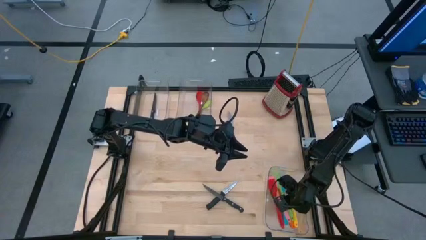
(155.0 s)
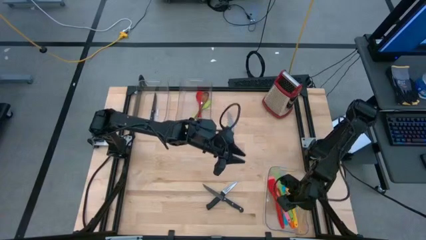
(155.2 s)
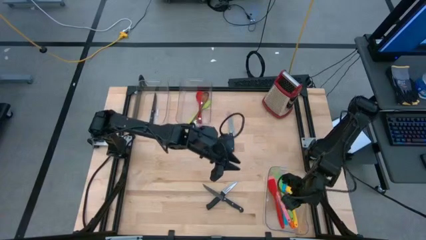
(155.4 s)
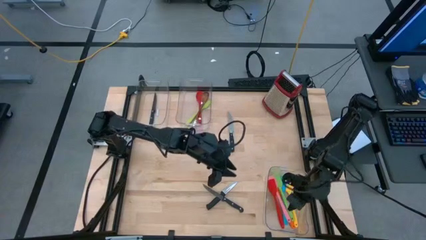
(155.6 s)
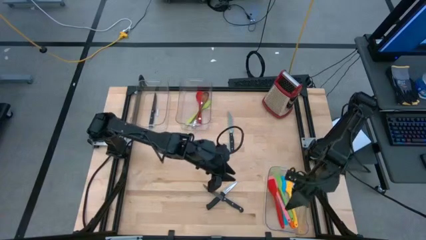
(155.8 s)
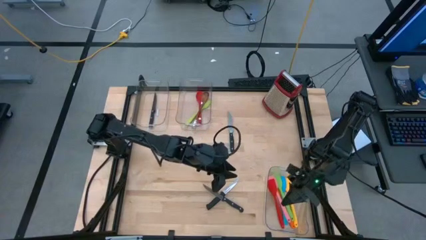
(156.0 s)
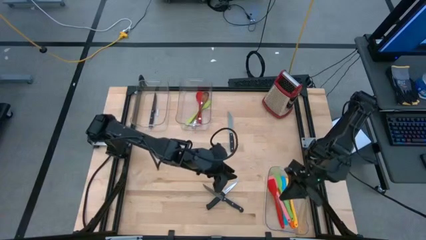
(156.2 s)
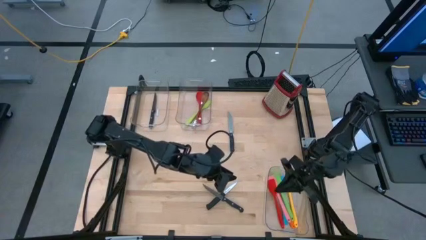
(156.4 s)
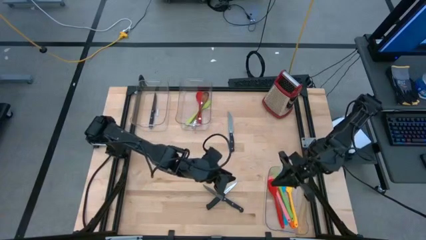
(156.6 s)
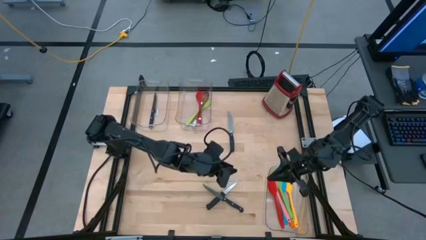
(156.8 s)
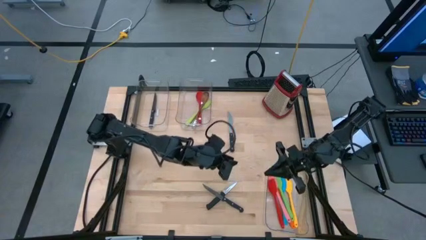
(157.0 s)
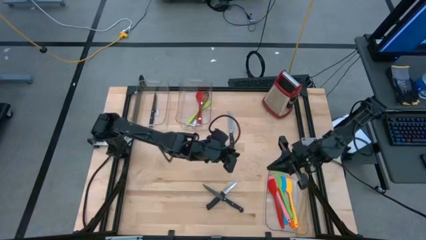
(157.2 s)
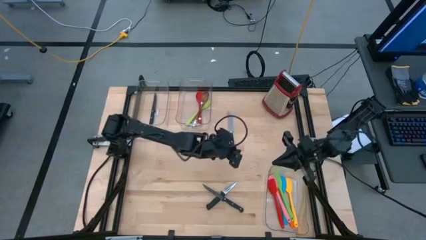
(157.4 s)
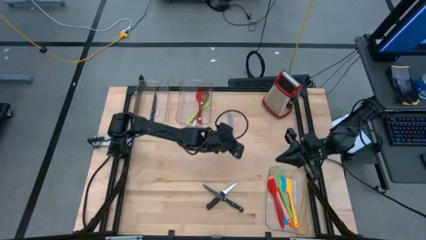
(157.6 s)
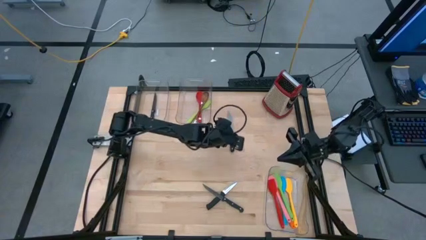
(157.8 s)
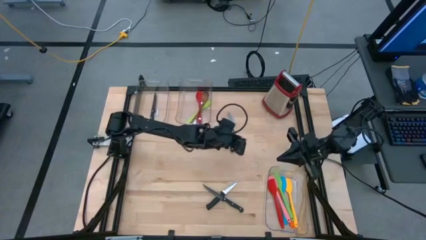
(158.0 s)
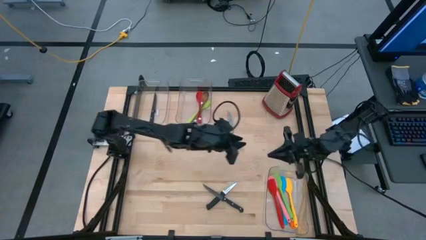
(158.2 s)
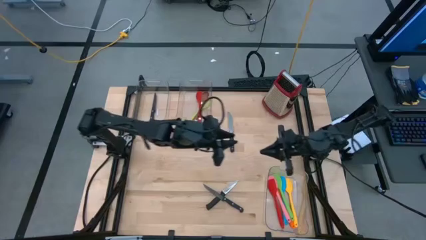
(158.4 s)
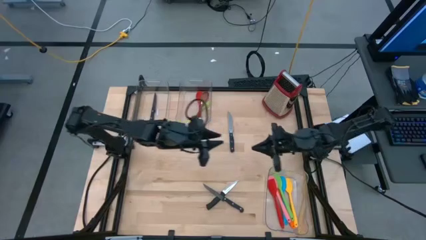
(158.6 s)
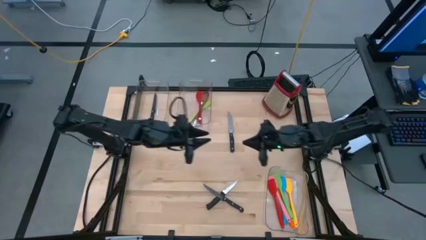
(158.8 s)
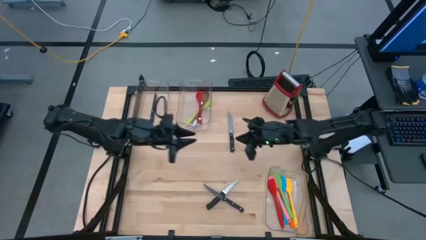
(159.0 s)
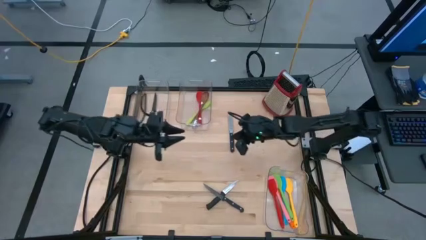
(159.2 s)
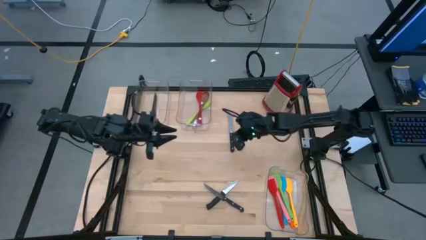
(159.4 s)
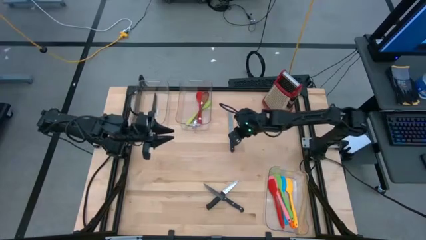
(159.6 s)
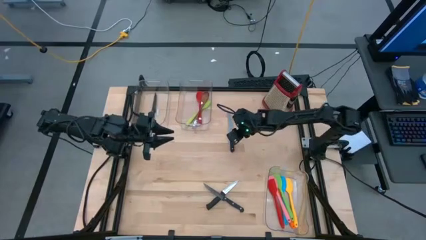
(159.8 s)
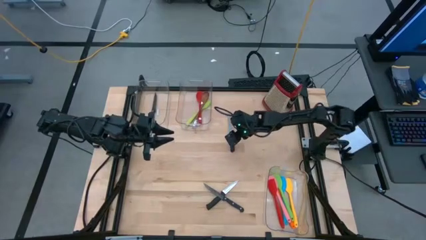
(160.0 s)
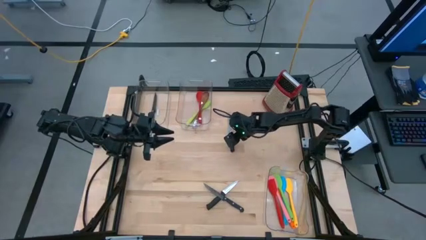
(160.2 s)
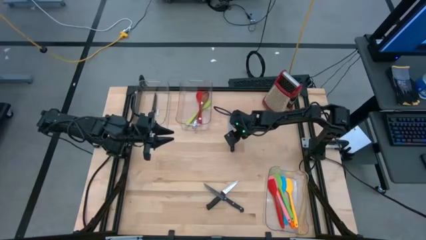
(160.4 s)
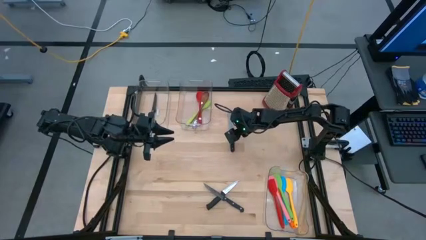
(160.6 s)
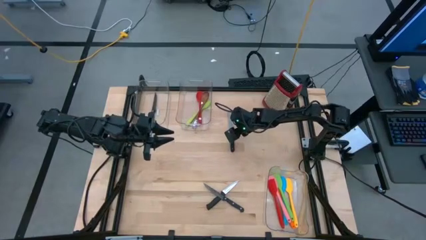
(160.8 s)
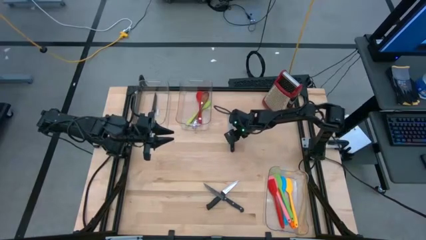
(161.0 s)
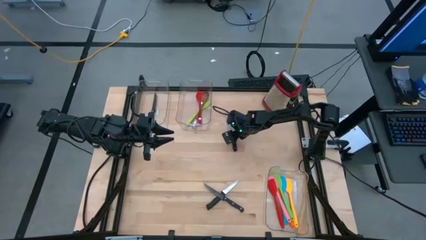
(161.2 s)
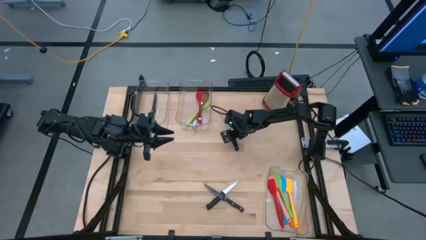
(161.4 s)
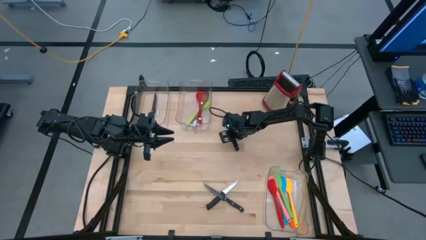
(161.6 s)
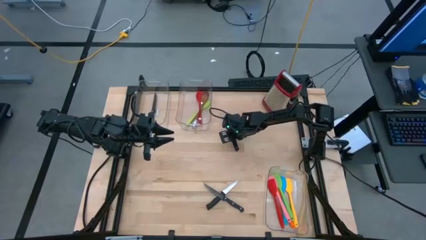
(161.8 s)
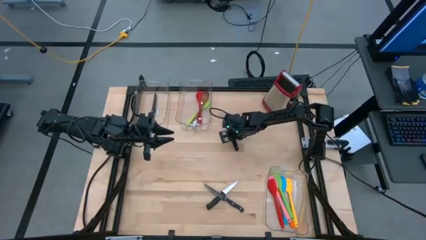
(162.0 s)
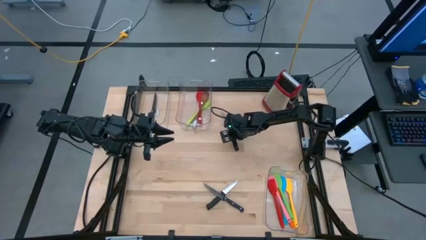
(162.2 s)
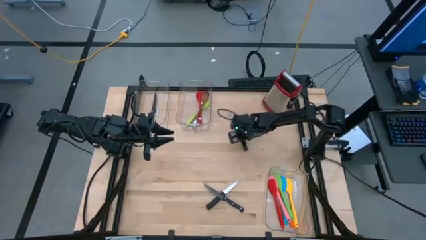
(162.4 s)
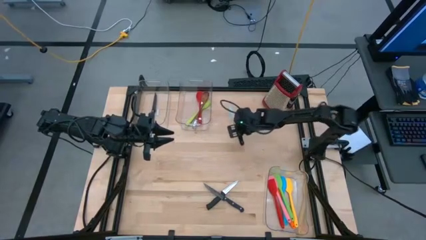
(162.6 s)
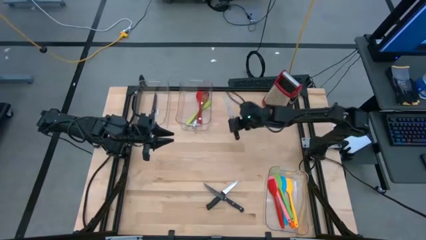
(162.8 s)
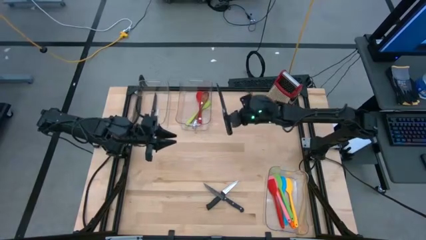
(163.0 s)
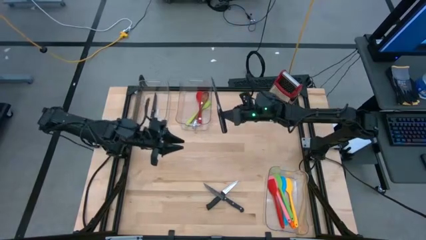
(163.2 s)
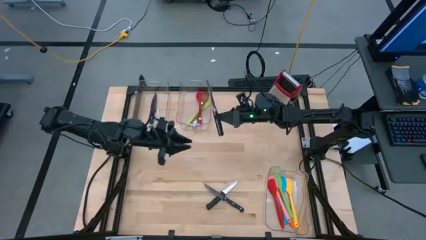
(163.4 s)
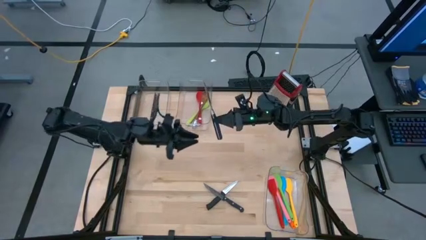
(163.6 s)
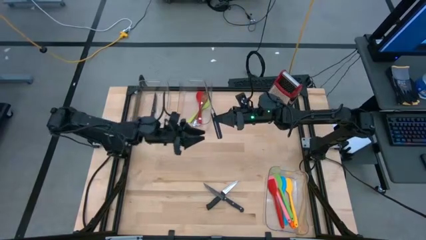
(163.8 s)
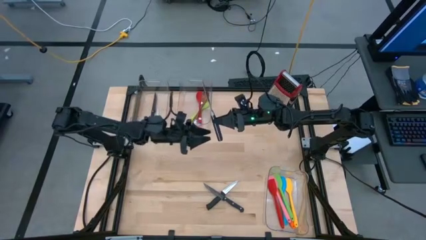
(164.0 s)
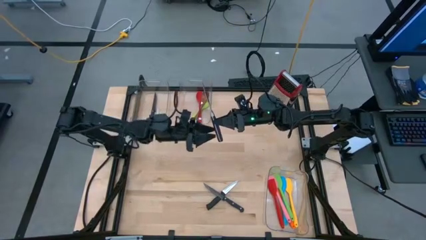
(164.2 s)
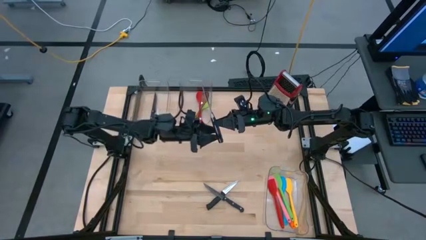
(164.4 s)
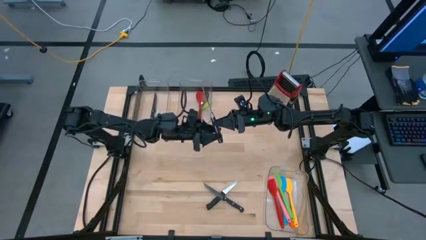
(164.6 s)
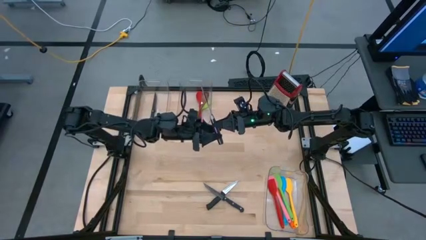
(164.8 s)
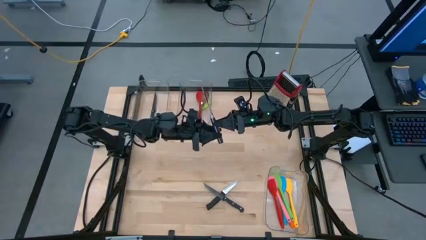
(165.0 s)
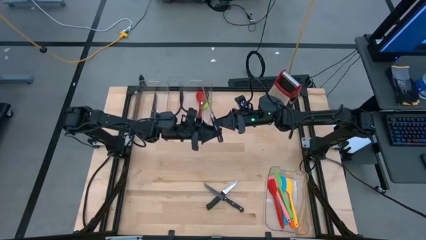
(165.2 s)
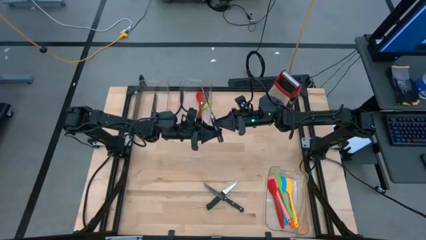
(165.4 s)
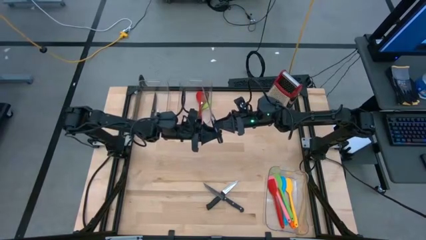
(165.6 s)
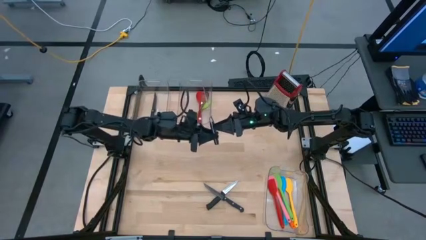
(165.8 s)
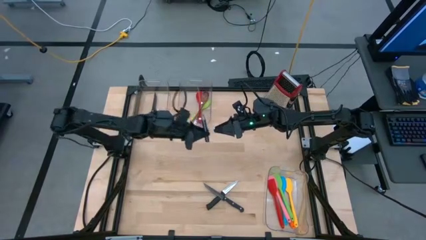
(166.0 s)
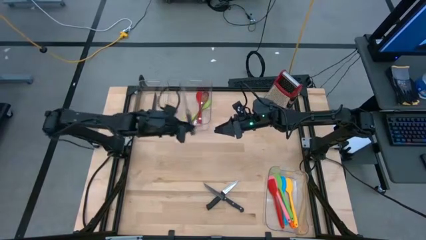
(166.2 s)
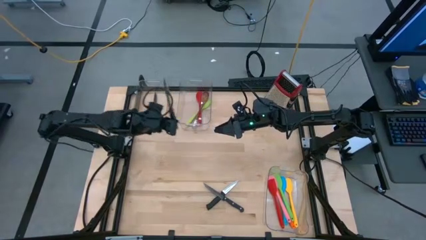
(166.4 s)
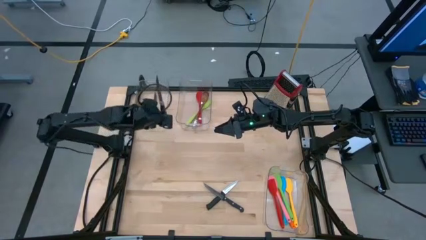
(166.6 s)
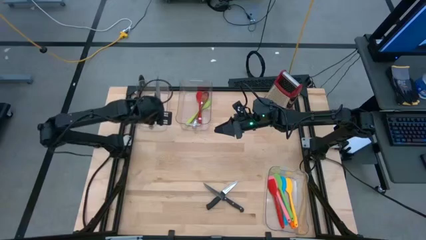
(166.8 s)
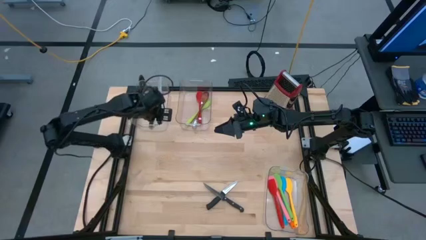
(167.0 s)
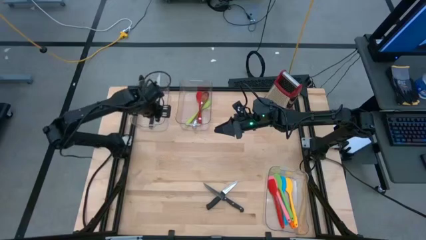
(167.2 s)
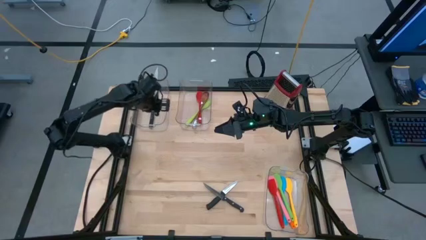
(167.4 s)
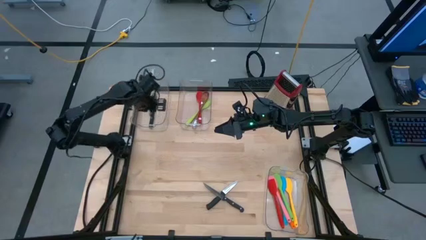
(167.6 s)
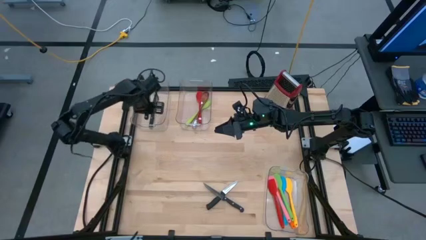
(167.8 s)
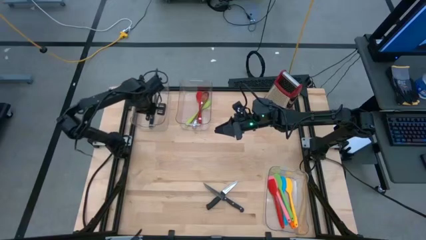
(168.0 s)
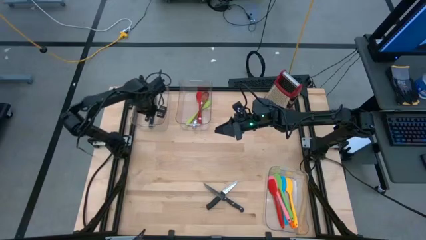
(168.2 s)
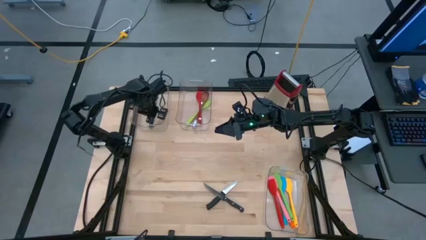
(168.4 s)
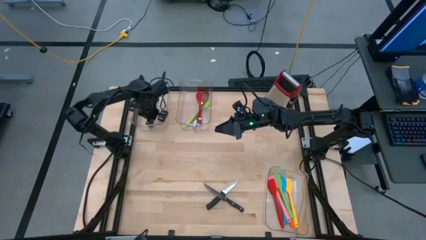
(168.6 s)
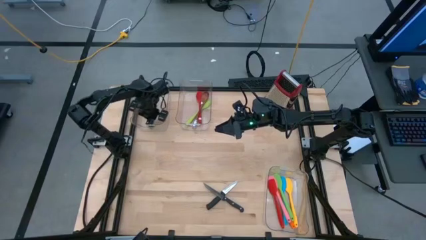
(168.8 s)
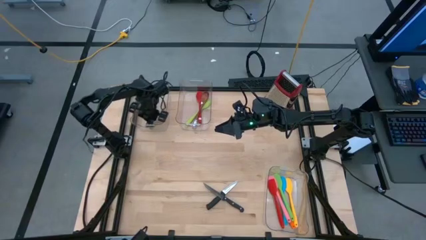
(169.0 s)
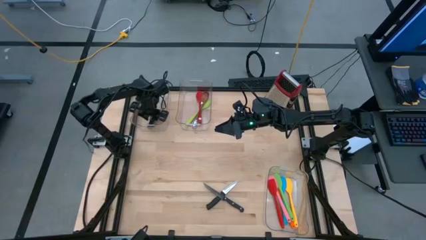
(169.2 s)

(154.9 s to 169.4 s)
Task: Pick & Place Kitchen Items
Put the black knife into the top left transparent bin
